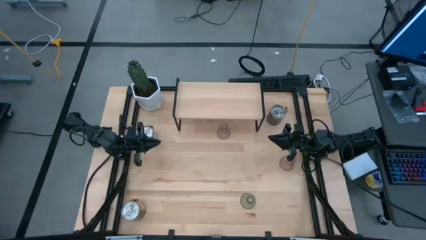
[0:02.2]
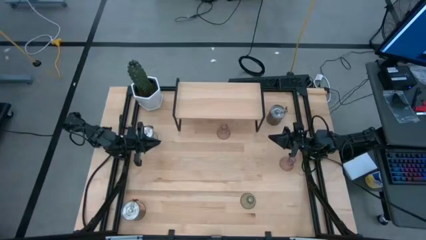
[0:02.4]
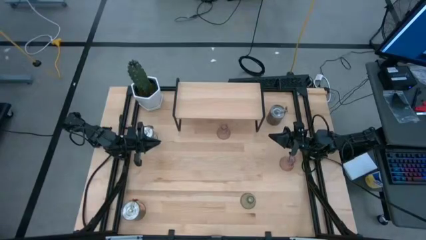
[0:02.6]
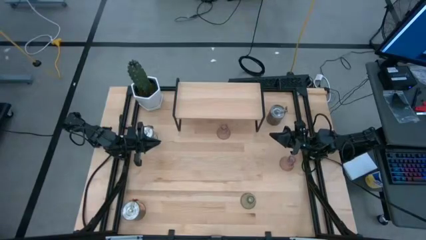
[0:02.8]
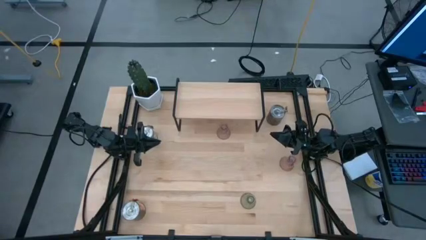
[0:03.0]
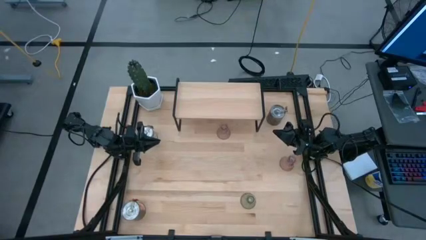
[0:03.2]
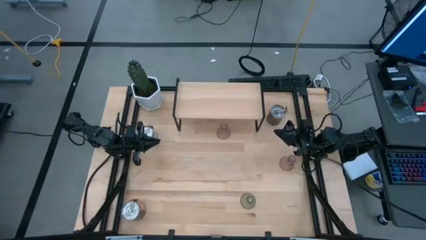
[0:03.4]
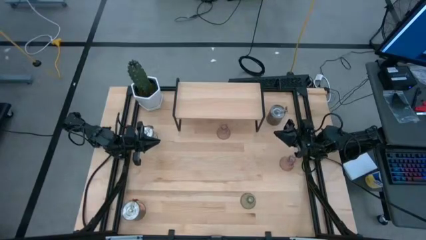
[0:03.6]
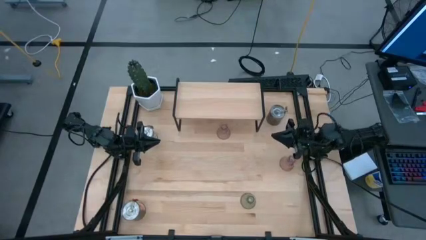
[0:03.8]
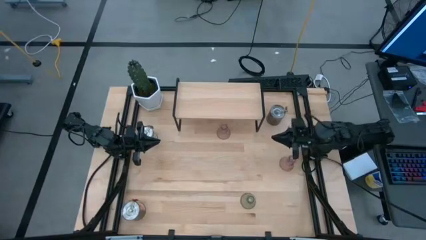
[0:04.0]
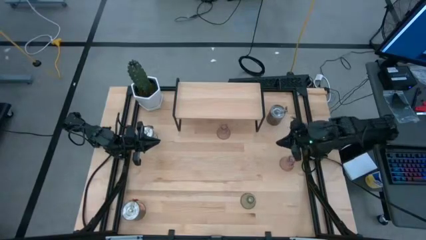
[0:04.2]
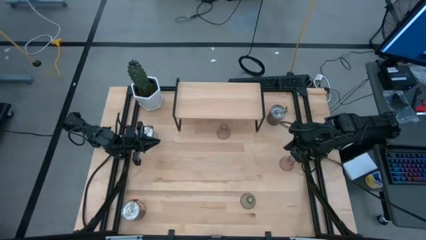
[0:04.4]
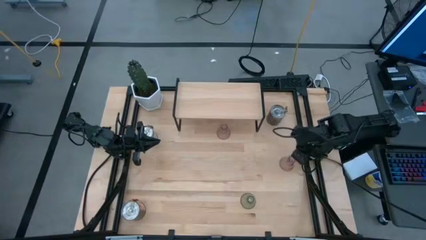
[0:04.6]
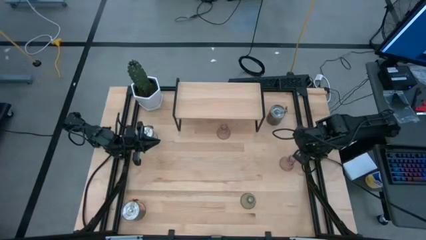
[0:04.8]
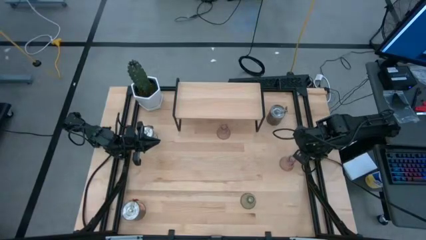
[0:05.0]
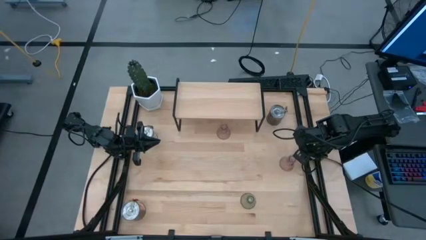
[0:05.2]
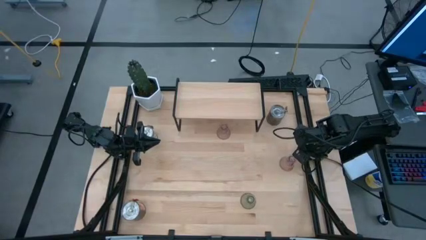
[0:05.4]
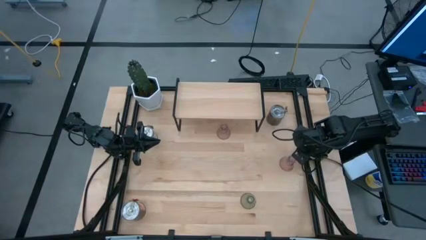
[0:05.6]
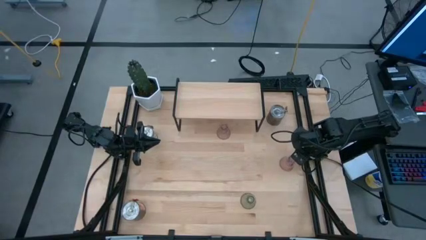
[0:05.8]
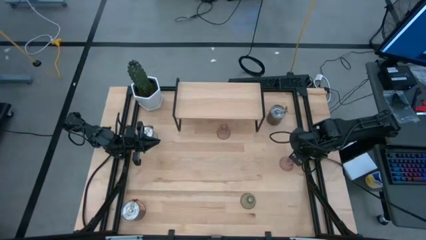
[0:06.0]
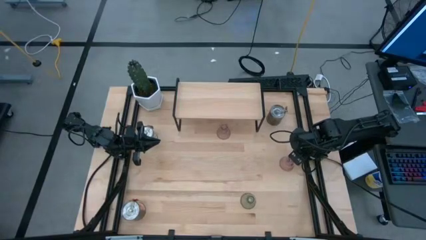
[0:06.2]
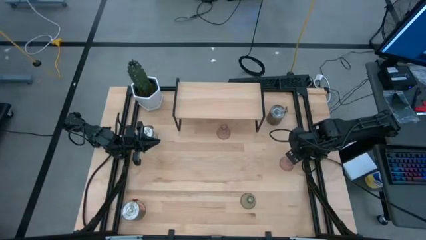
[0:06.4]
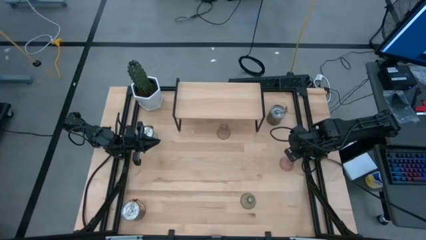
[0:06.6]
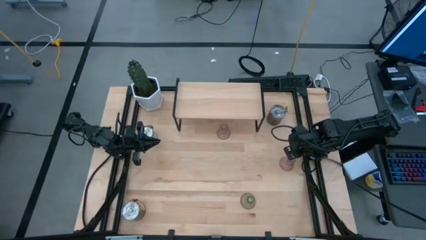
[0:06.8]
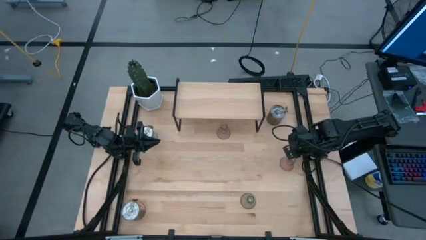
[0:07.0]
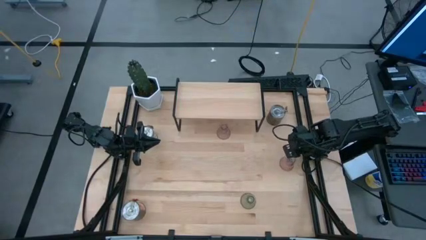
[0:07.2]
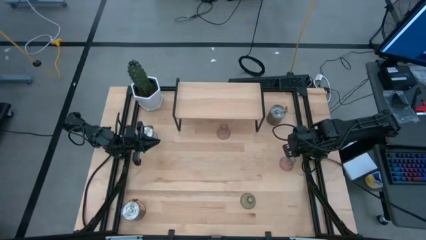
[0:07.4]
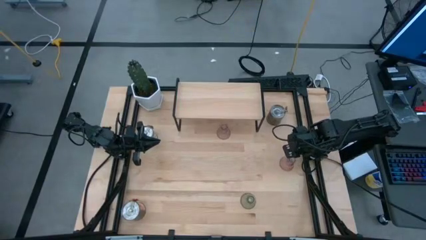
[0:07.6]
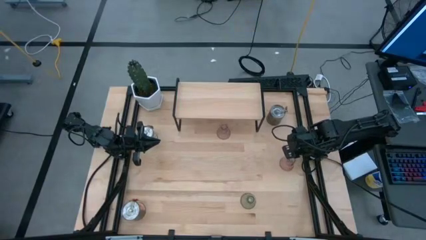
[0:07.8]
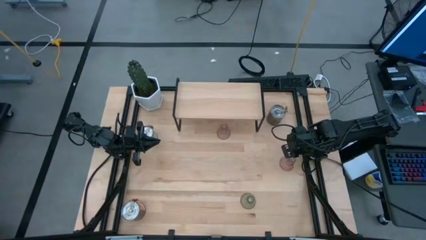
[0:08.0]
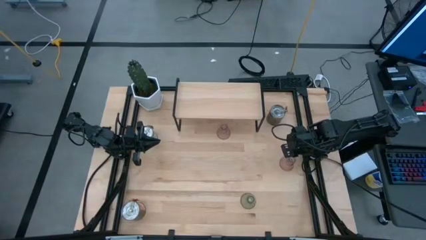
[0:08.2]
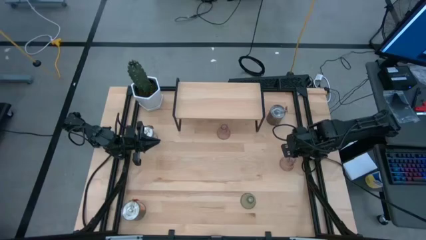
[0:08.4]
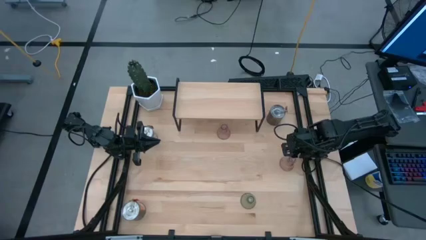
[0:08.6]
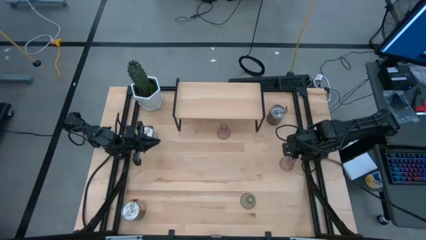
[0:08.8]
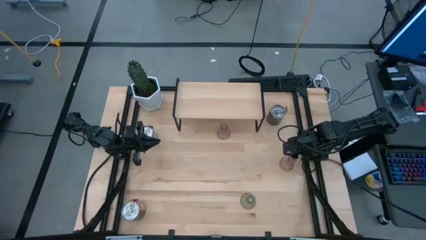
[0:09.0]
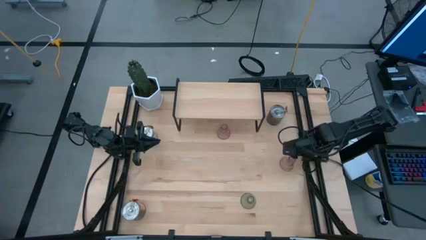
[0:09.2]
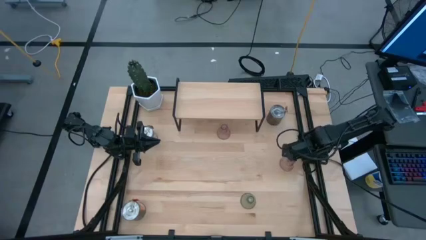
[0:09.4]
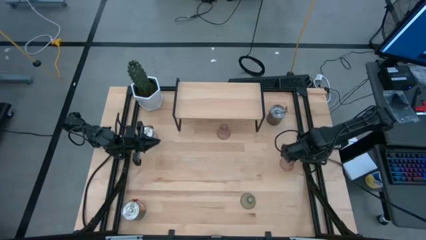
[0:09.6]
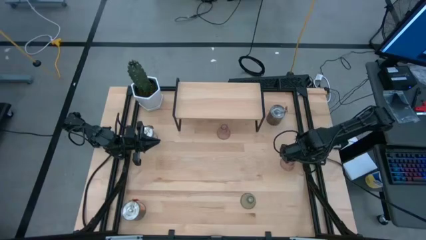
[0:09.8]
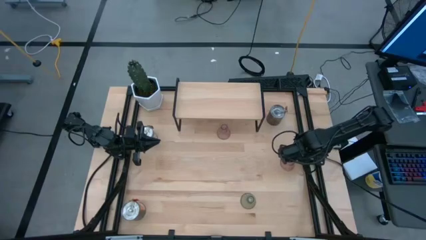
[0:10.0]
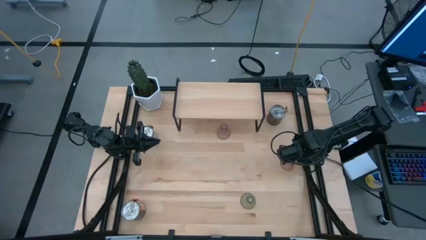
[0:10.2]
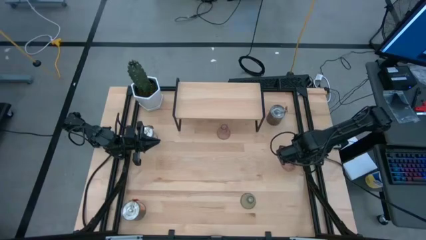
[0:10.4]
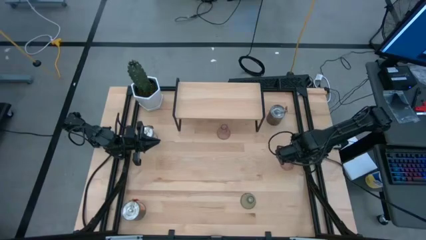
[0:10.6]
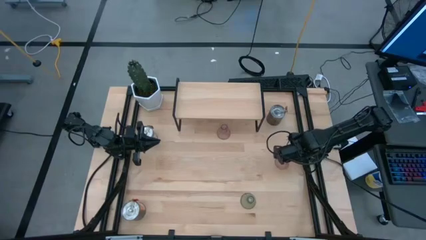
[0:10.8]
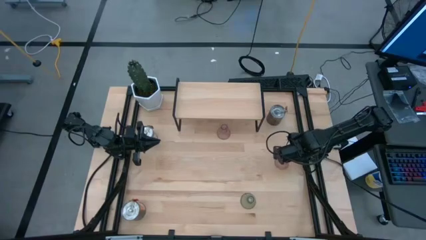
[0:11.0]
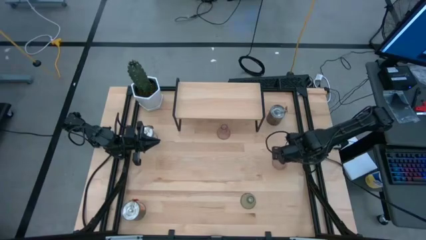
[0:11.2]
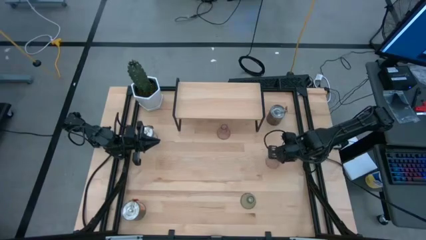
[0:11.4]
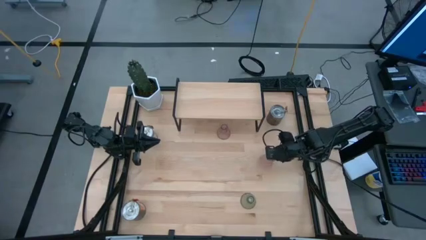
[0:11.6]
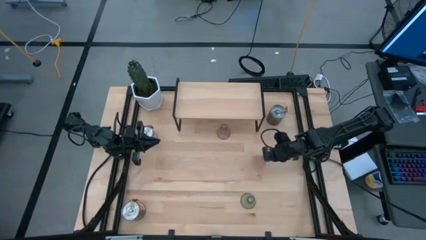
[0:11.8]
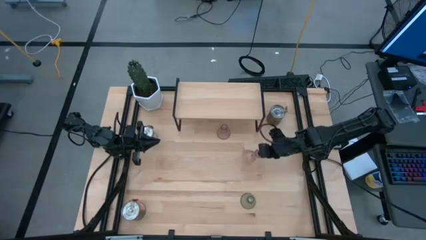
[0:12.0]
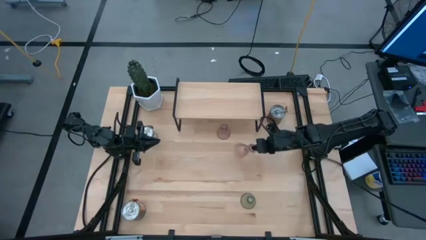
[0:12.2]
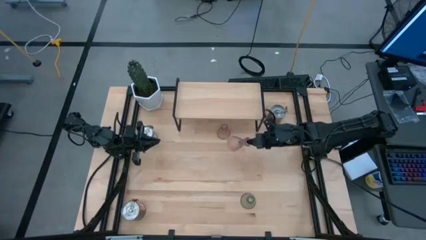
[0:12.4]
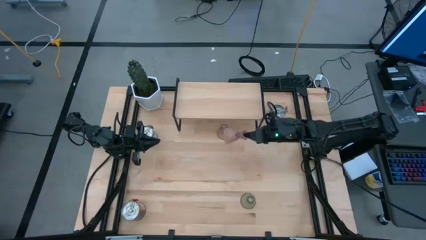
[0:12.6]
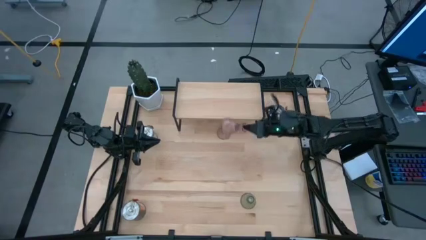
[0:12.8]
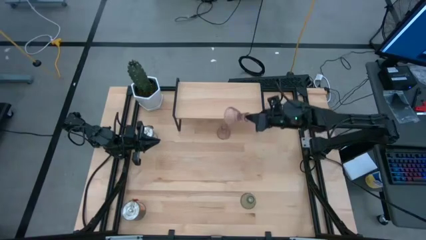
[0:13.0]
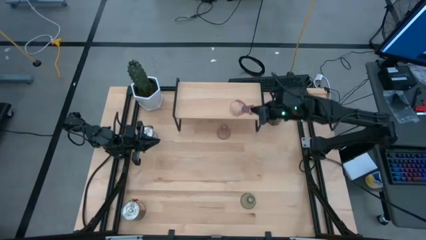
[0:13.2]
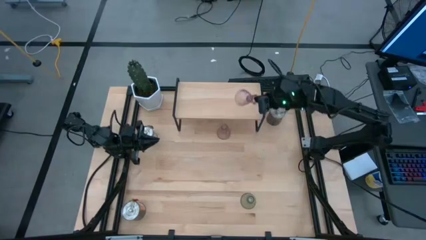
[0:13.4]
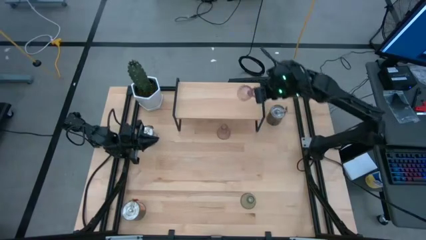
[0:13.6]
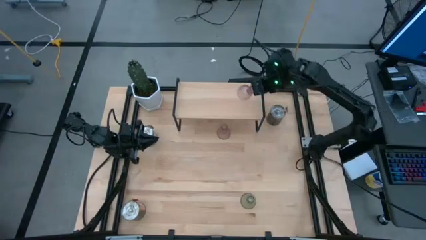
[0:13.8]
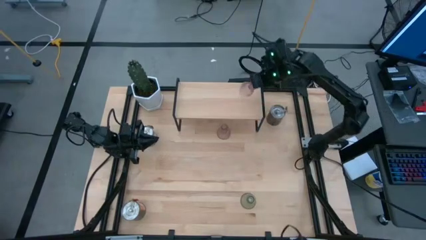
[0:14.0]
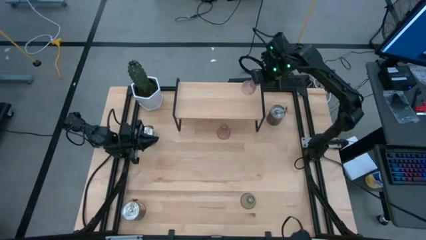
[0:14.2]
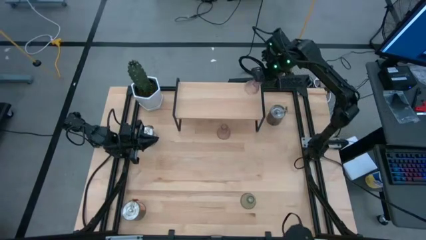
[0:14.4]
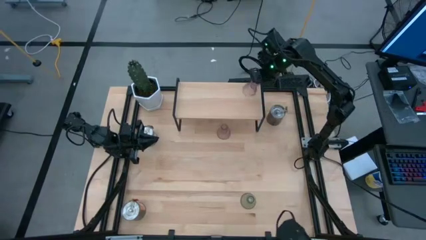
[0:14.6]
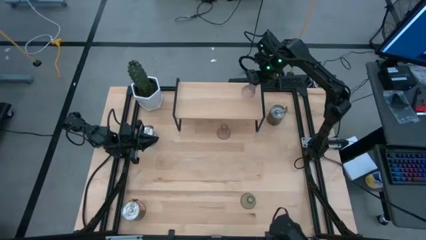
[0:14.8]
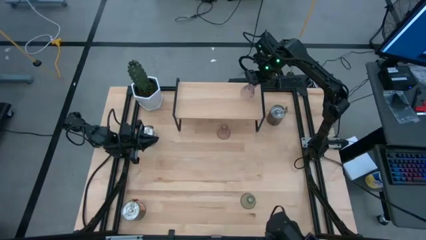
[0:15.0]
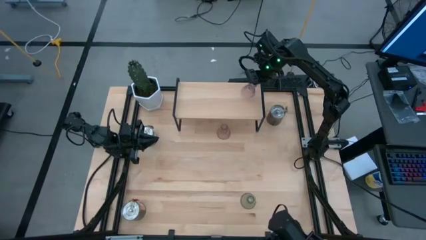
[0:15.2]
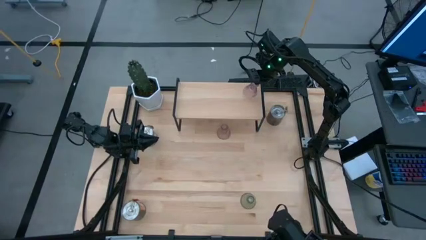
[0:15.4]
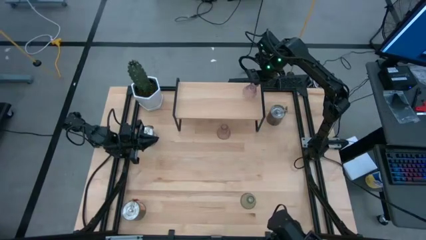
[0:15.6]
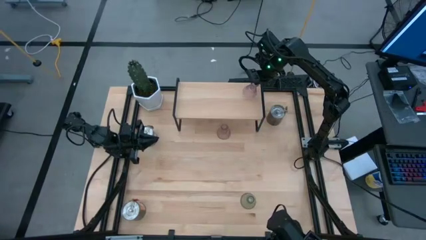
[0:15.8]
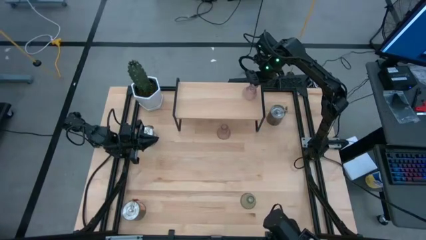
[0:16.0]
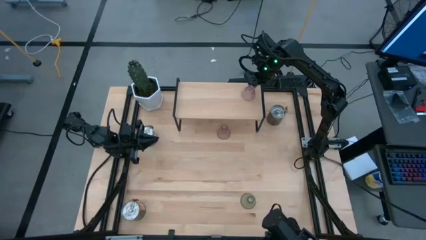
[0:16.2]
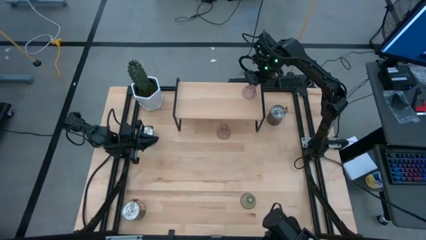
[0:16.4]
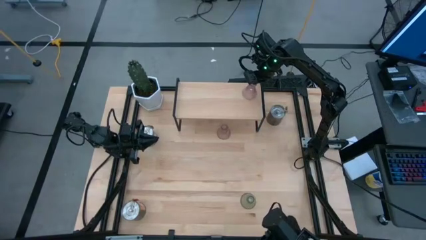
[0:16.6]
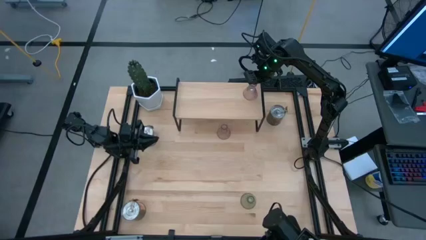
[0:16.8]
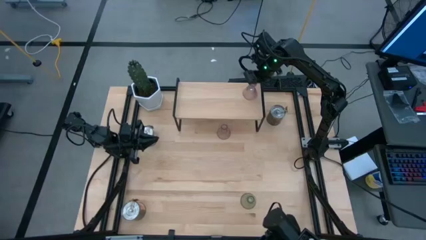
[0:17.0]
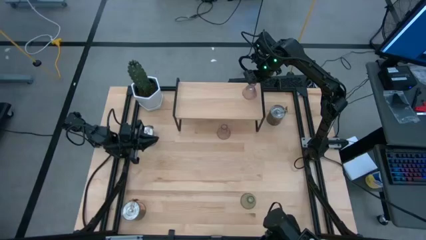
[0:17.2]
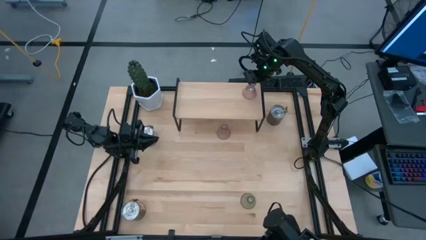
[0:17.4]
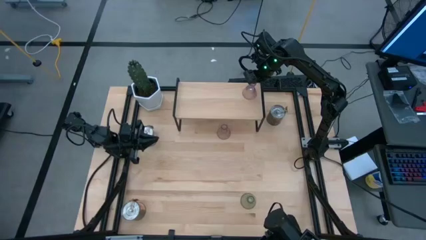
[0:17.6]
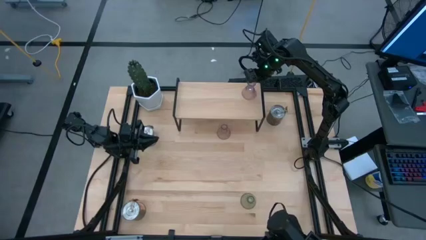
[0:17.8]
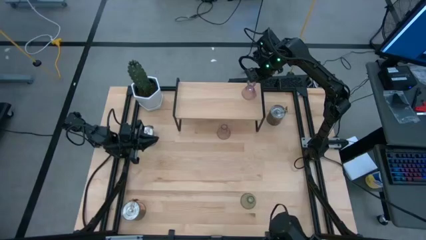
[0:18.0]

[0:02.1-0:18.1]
Task: Pick & Place candle stick holders
Put the right pink scented candle on the shelf
